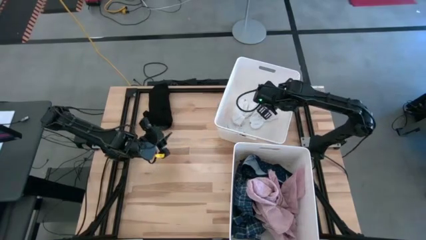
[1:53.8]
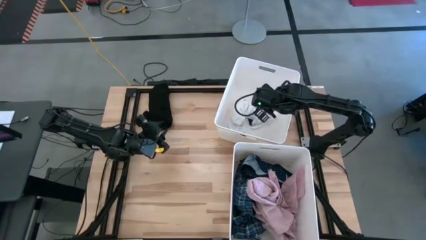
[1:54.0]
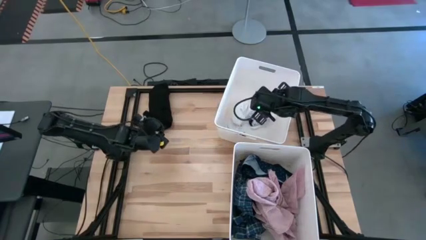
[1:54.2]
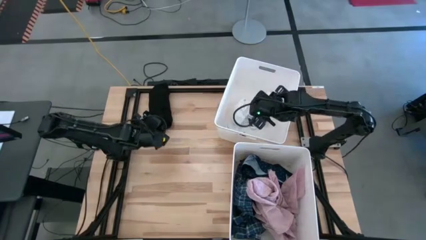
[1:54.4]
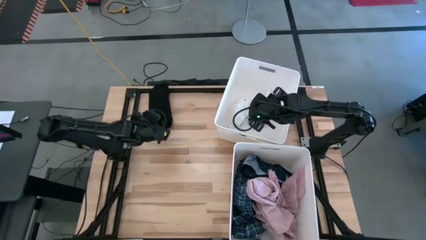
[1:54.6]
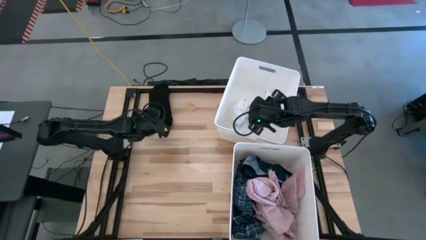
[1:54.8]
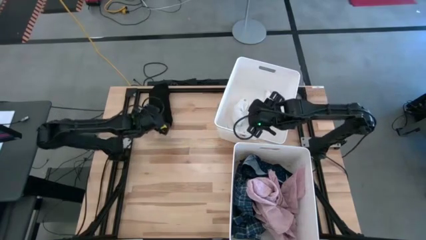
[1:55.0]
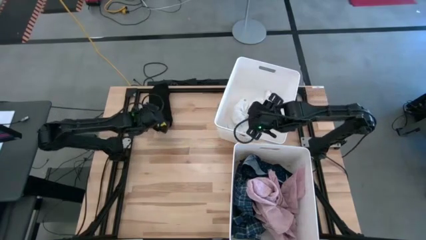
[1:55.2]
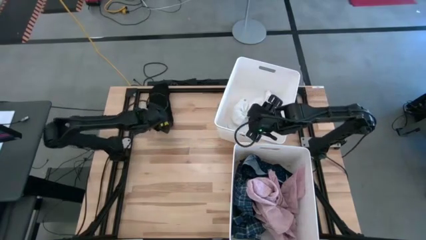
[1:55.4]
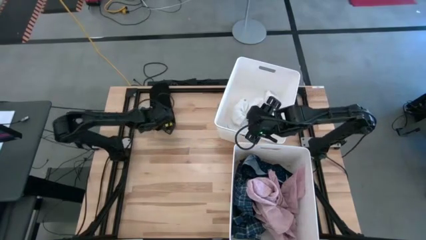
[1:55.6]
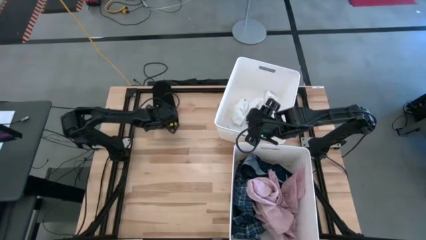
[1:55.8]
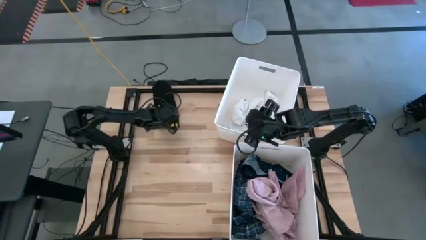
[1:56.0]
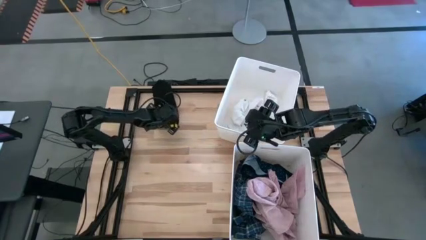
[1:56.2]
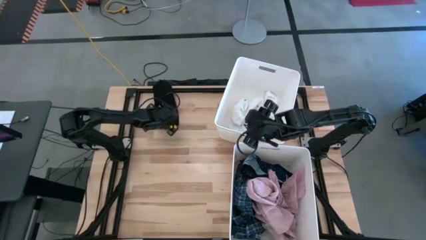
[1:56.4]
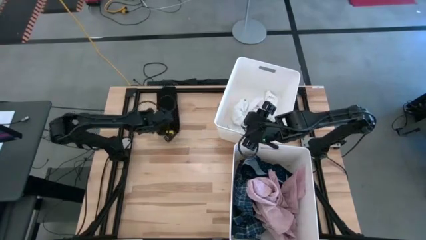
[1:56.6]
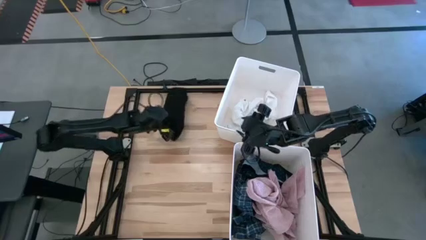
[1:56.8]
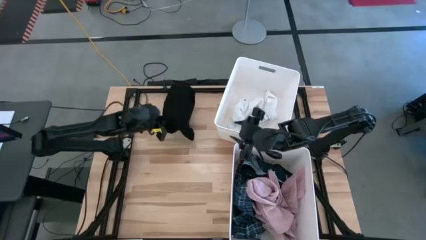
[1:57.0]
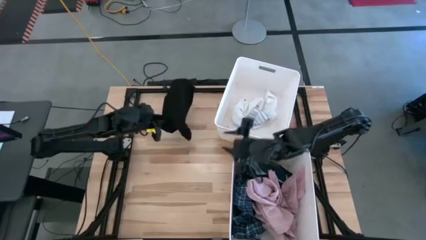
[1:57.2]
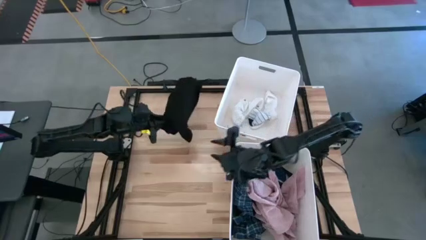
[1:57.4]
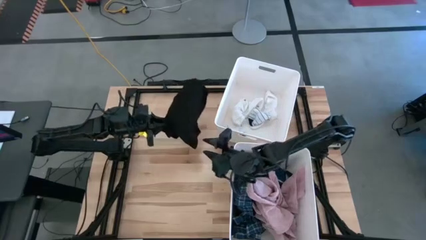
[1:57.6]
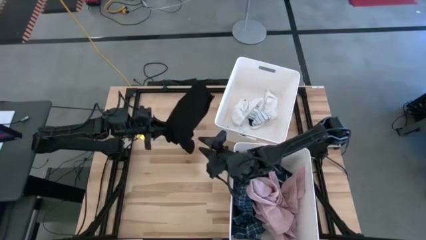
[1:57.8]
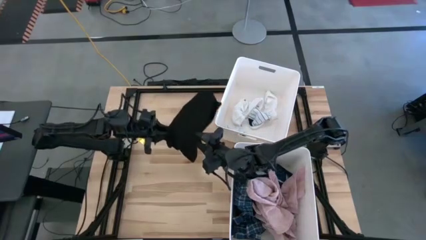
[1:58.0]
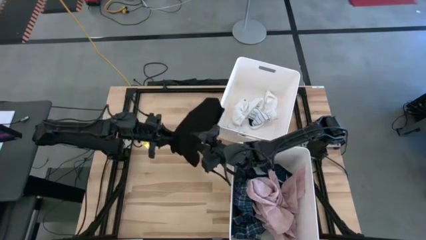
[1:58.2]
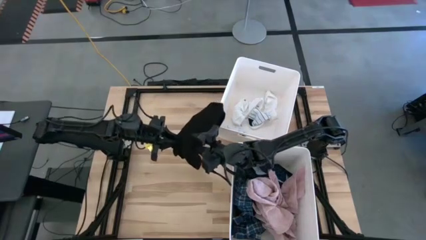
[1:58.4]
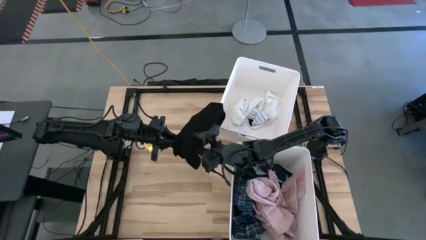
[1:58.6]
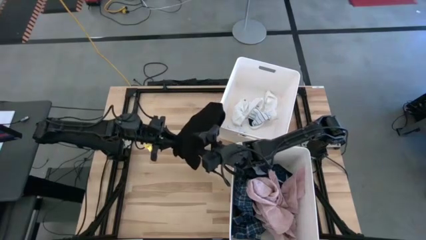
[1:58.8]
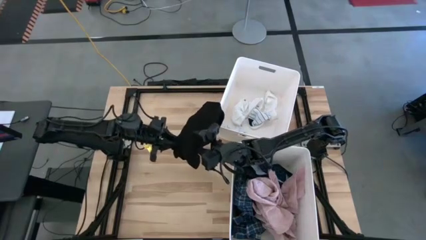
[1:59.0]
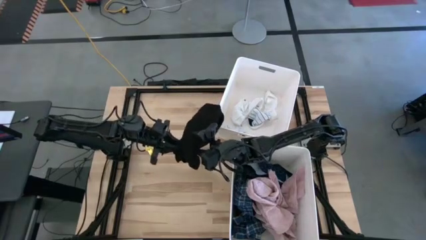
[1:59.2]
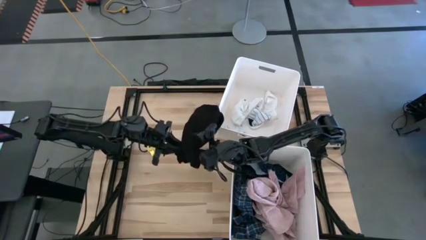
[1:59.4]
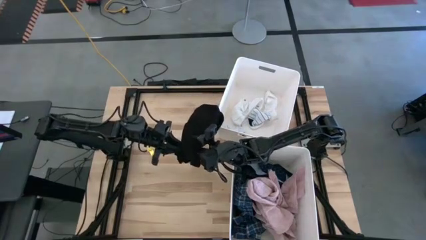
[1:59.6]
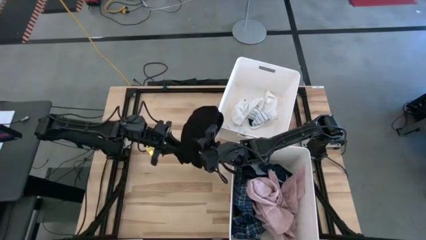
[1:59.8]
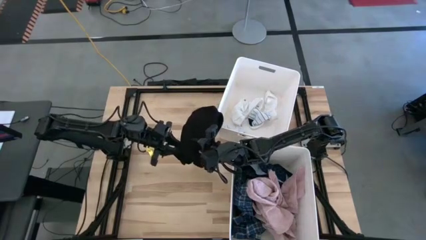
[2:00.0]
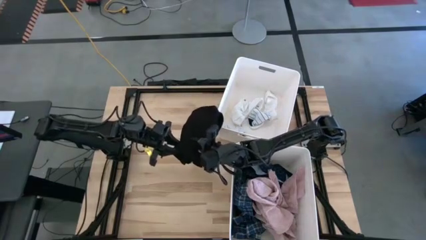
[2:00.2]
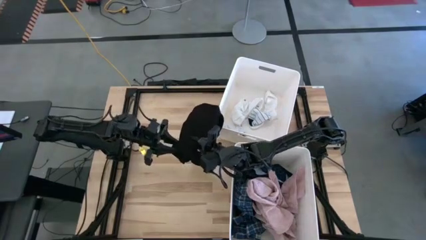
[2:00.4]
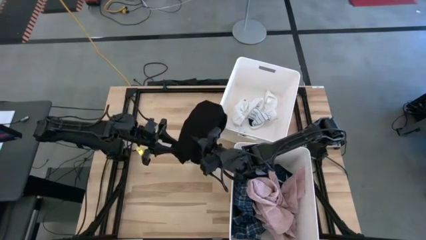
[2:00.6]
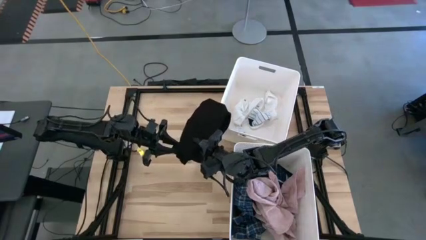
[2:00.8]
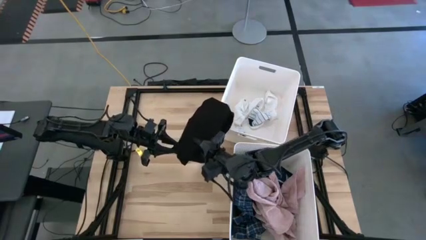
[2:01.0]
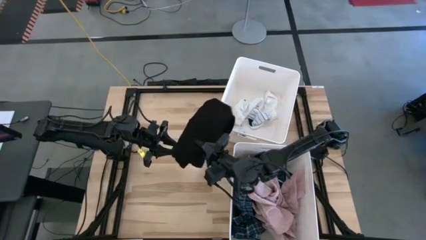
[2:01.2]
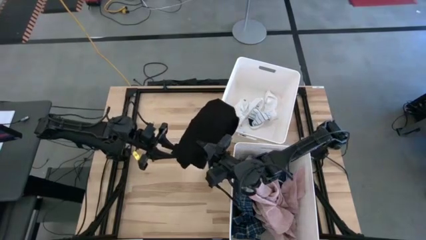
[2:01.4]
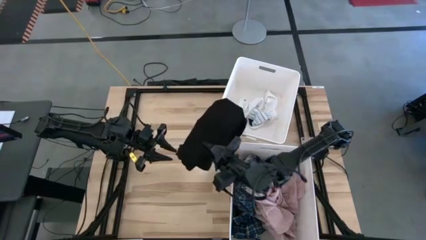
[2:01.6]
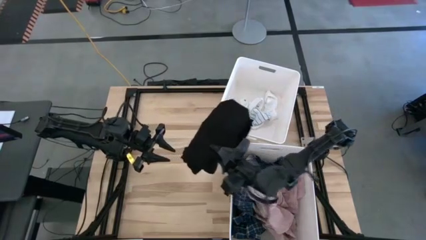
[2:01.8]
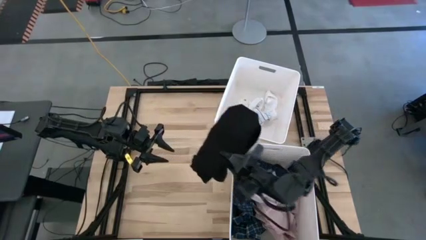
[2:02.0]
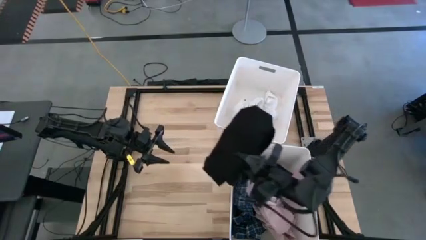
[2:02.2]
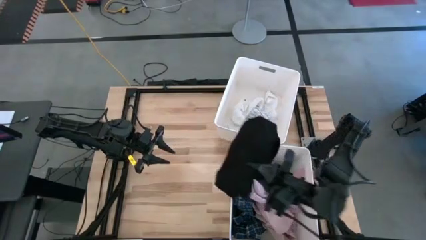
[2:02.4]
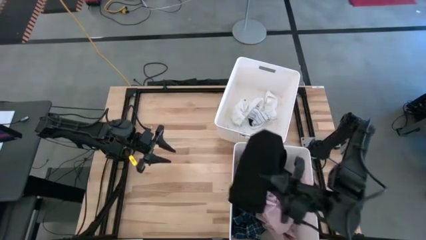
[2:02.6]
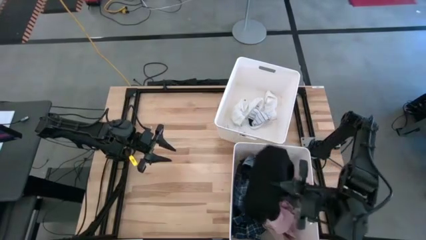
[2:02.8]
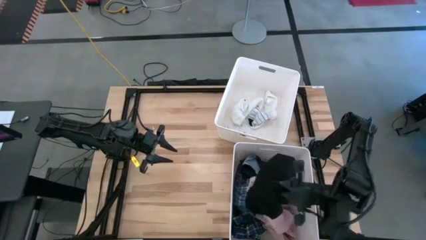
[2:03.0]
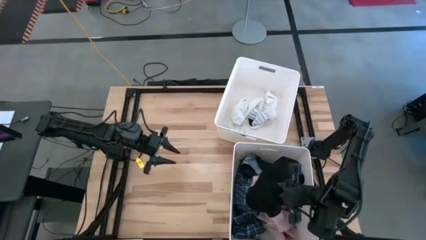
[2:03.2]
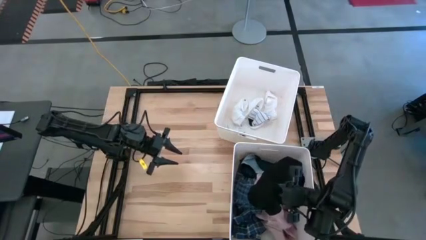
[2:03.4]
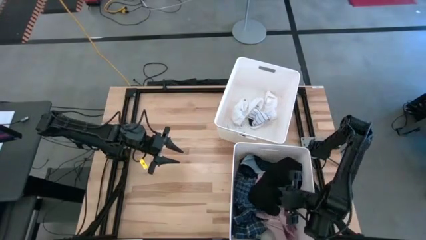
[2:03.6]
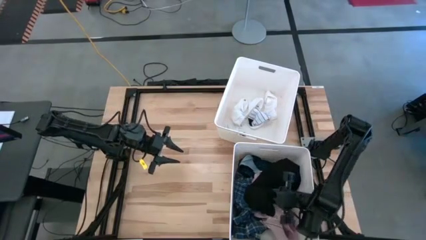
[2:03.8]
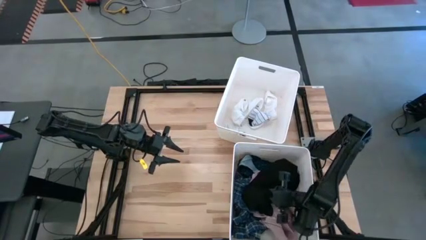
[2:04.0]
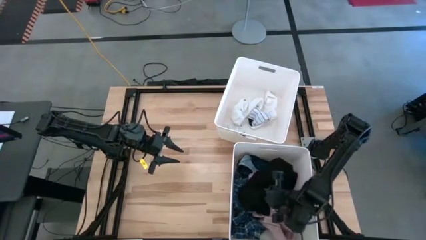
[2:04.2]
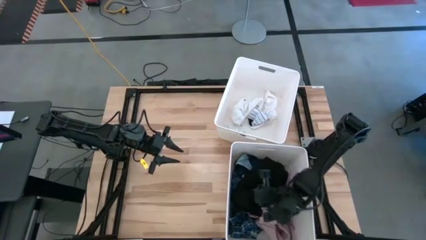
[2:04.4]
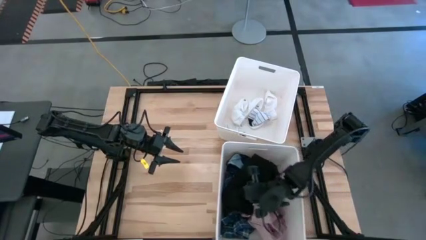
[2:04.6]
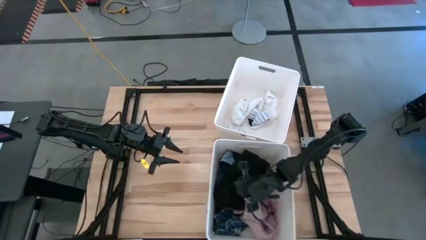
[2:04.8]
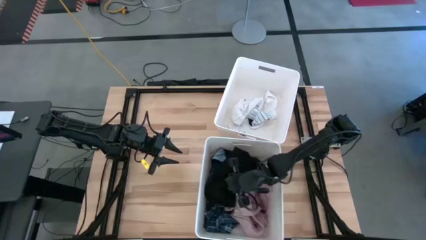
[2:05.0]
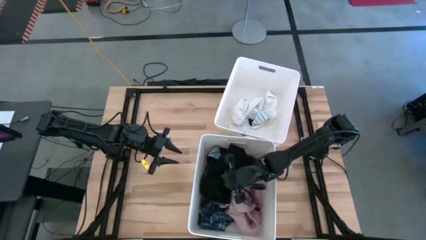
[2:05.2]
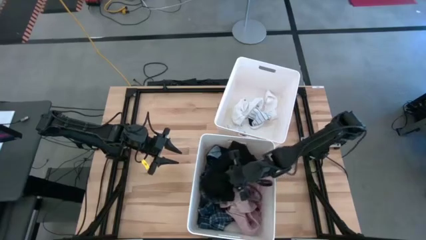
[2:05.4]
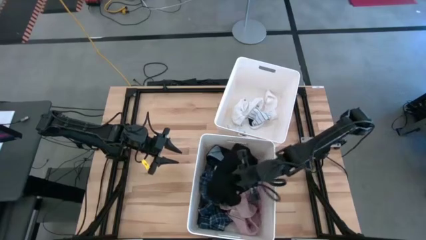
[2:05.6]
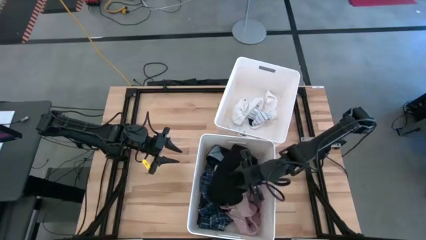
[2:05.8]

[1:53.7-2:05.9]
Task: Sort clothes
Put the black shirt into the bottom white laundry bin

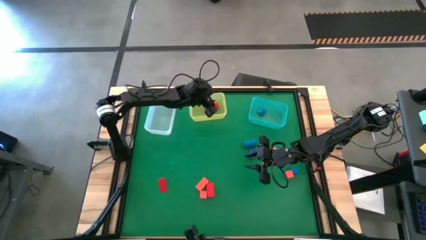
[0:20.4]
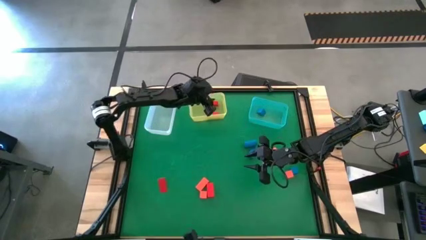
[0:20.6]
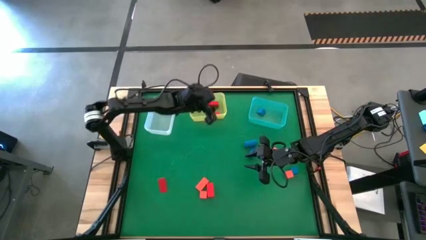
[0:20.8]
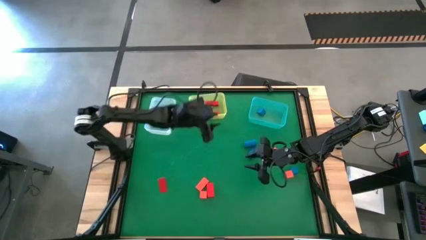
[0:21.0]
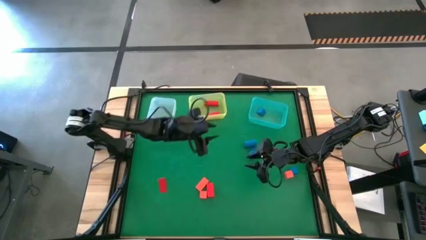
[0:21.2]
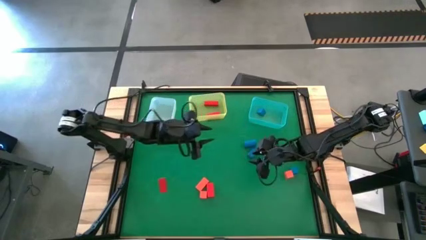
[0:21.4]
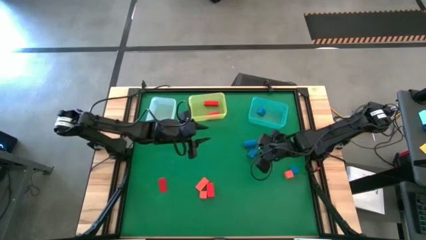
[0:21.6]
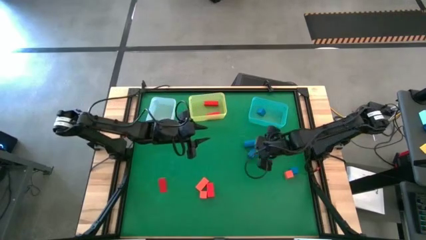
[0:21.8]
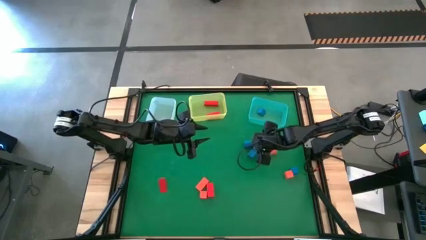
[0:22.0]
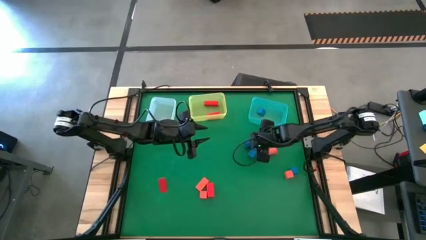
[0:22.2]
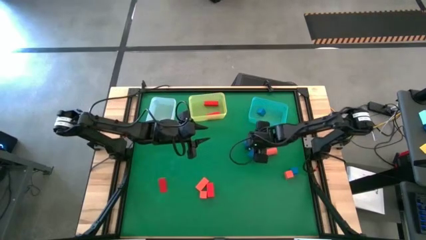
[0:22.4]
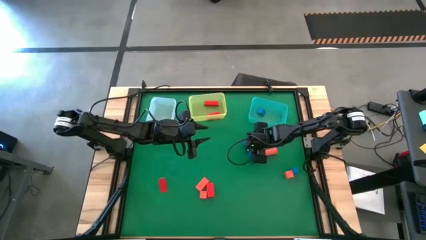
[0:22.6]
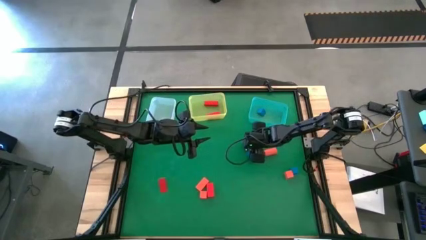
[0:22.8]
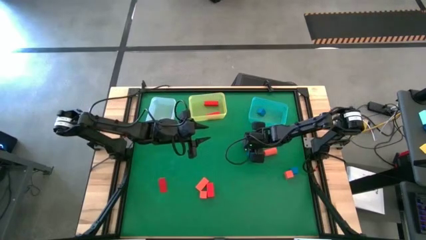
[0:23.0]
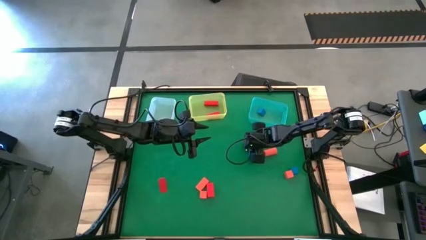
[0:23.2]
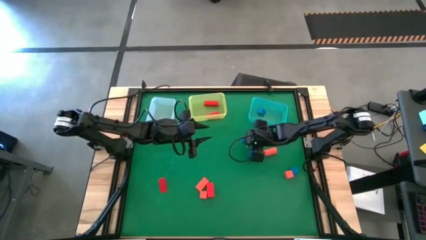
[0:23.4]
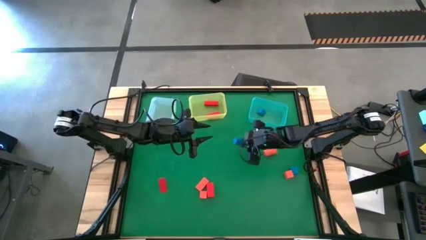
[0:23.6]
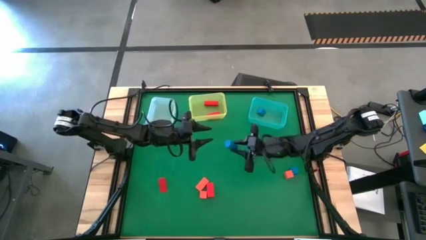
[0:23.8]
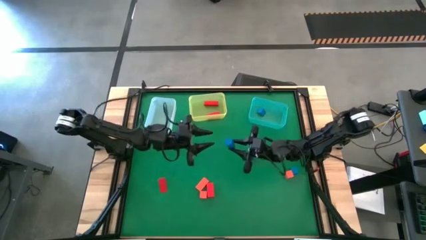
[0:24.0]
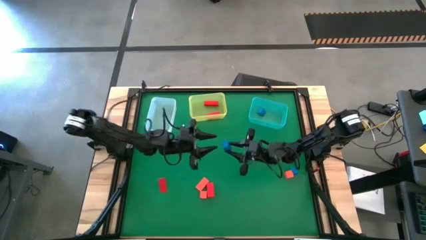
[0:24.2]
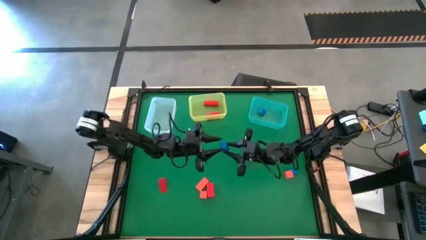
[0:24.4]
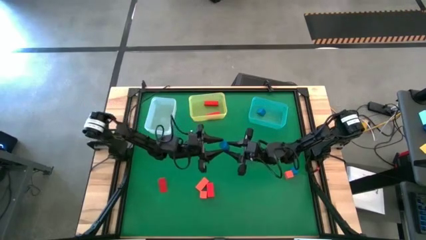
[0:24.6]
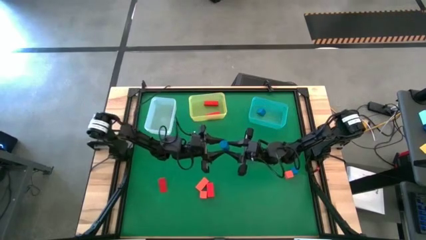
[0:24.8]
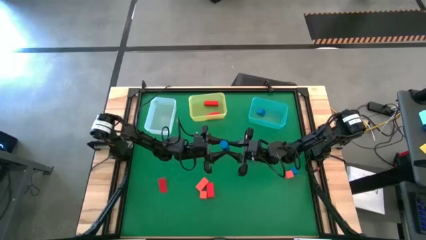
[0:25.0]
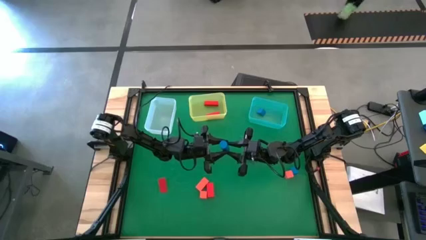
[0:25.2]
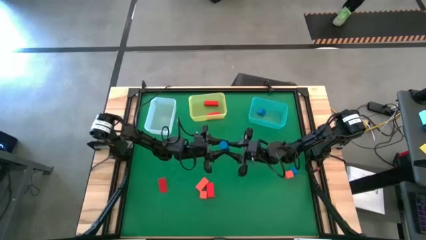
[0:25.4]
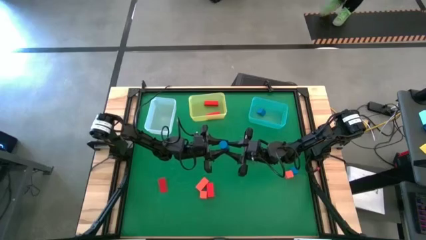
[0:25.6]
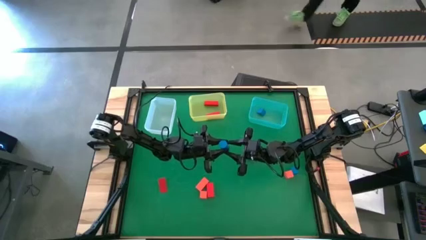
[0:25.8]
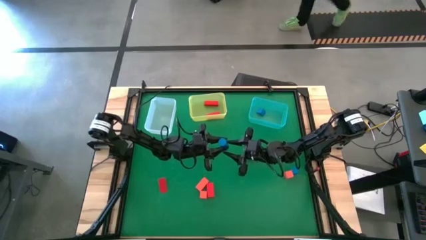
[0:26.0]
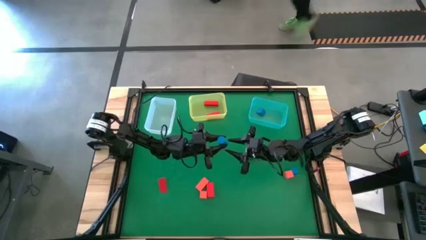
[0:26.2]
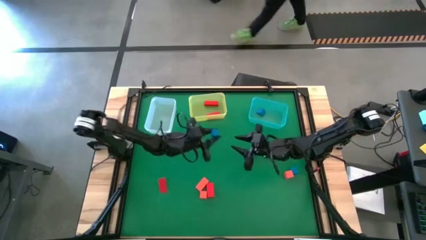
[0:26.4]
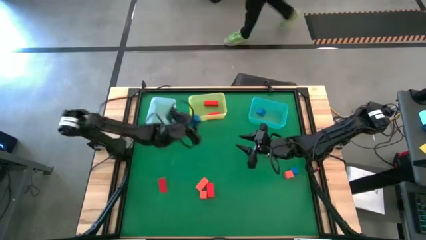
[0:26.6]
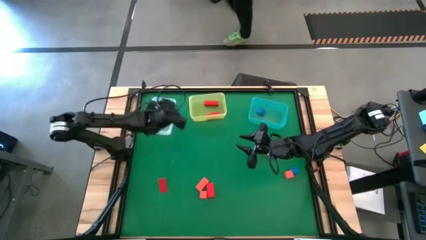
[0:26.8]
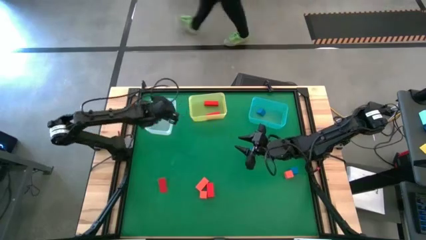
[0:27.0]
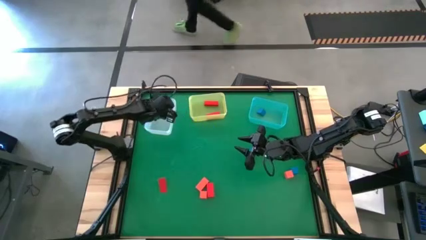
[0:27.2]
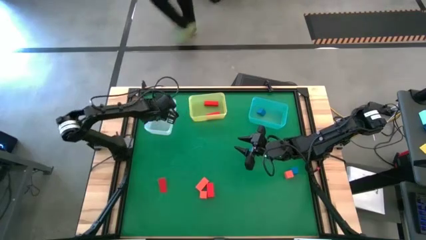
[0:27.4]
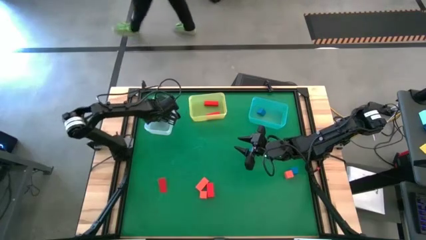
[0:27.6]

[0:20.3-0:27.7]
Task: Sort & place blocks by color
Put the blue block into the blue bin
